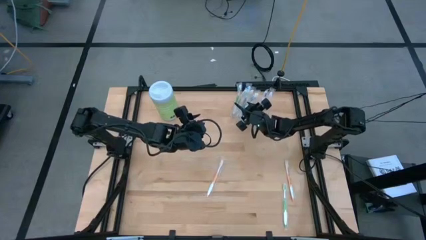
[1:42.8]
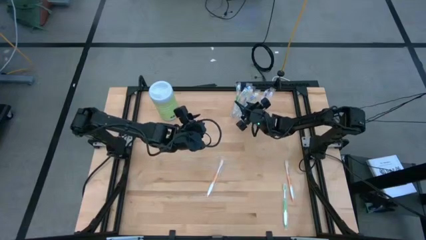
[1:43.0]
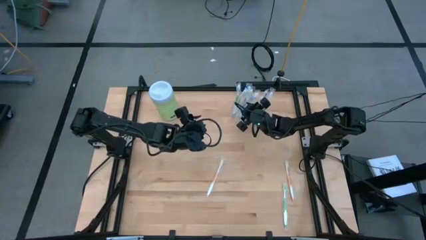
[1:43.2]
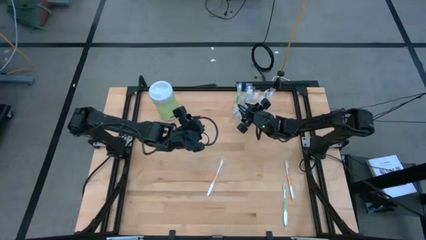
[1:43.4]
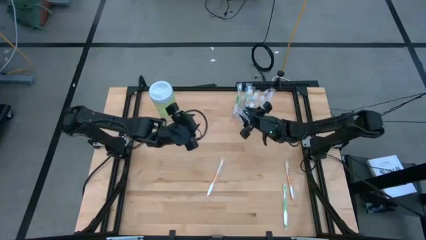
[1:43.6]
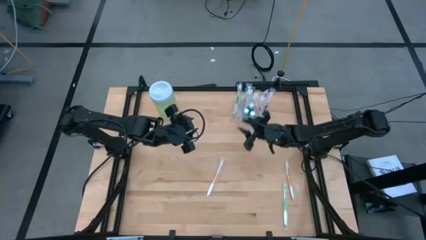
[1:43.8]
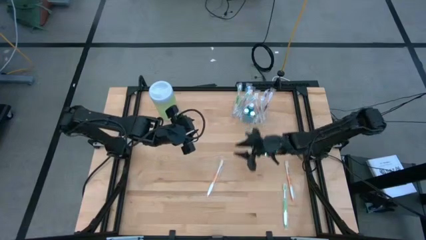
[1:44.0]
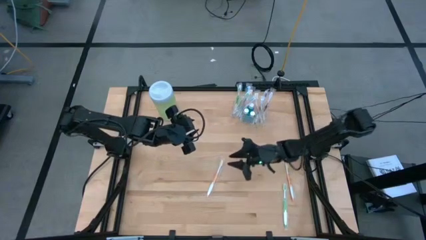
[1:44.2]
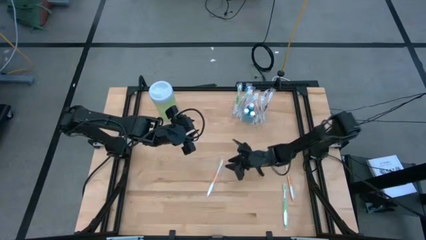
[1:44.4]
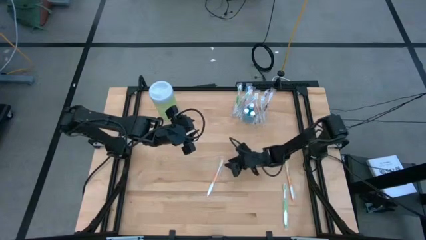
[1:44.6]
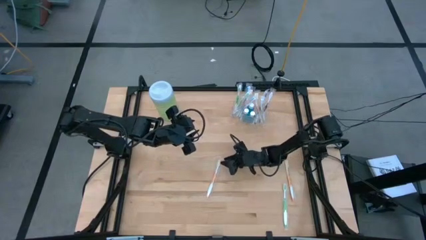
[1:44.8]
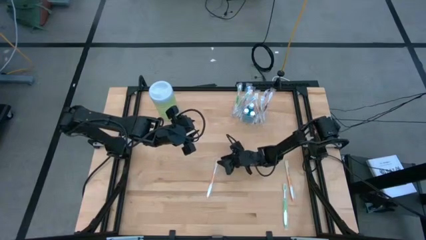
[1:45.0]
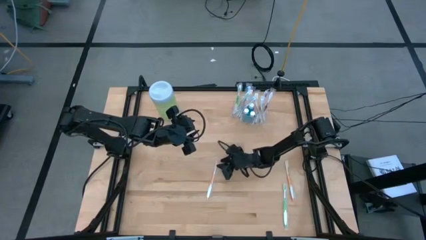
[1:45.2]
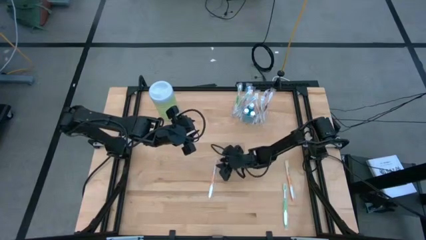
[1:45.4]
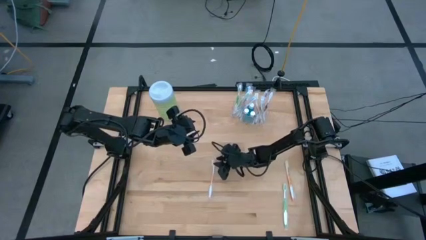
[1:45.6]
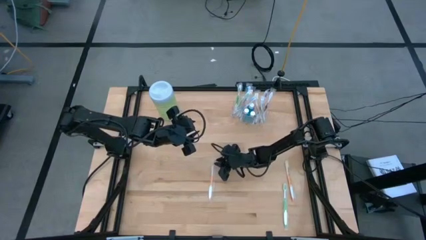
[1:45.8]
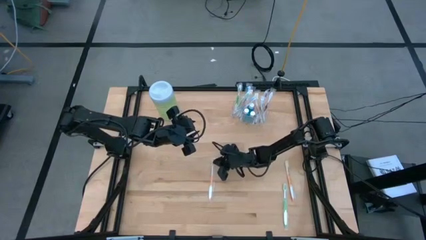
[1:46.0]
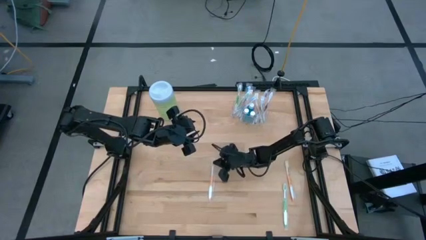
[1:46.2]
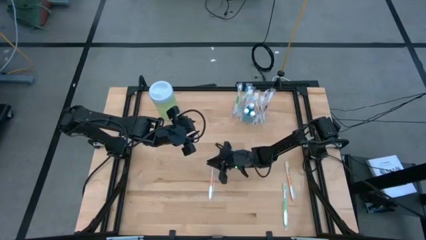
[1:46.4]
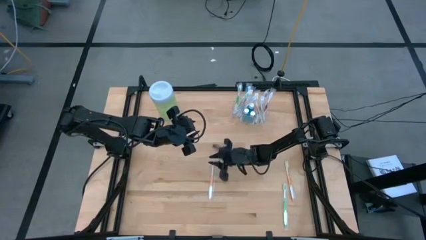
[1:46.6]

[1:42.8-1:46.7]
Task: Pick & Place toothbrushing station
Put the orange toothbrush into the transparent organizer

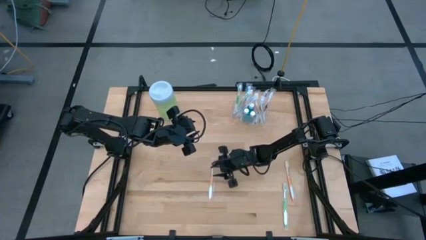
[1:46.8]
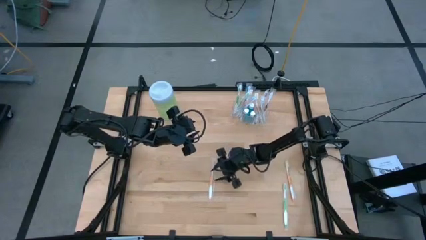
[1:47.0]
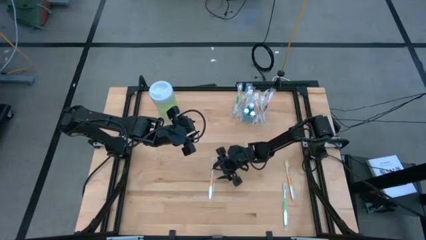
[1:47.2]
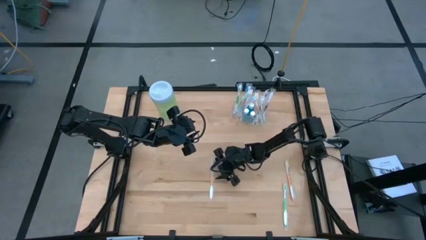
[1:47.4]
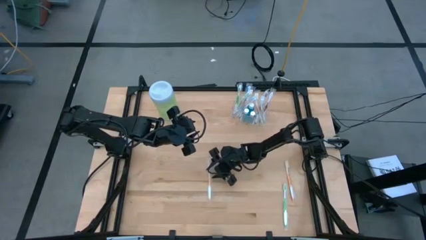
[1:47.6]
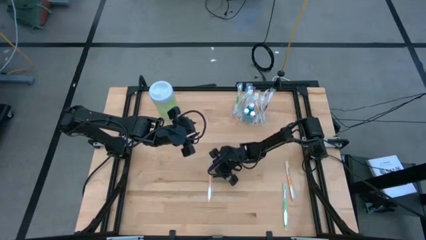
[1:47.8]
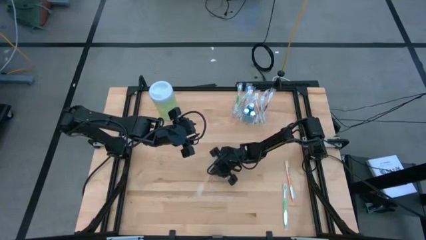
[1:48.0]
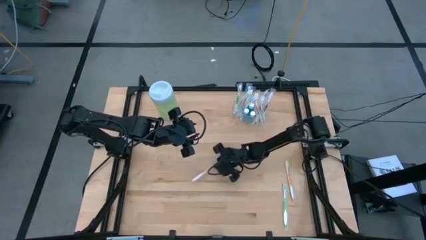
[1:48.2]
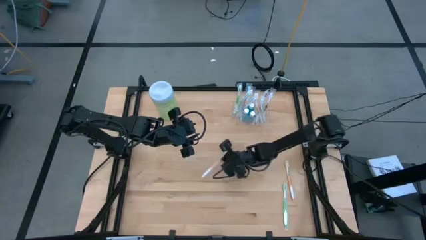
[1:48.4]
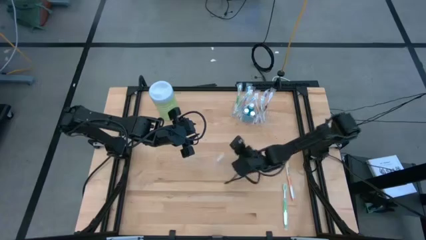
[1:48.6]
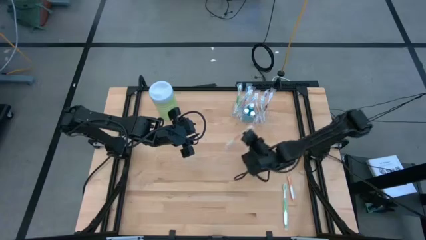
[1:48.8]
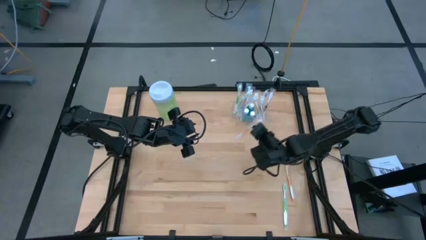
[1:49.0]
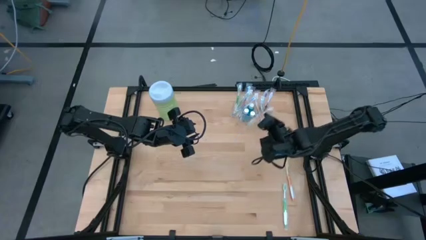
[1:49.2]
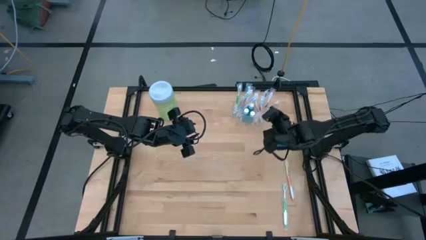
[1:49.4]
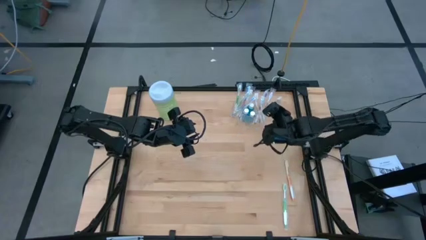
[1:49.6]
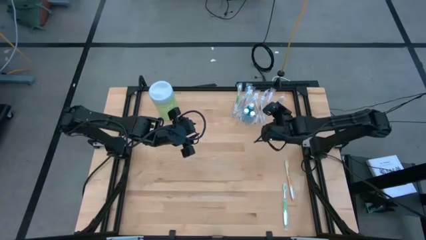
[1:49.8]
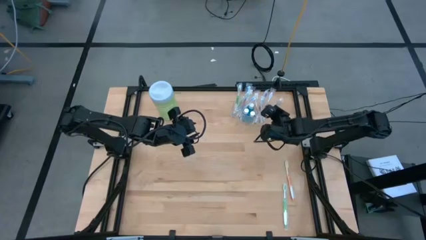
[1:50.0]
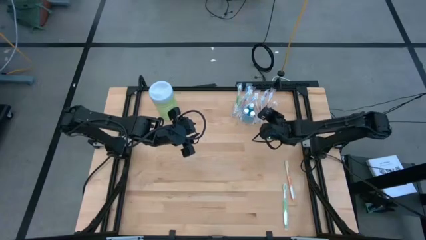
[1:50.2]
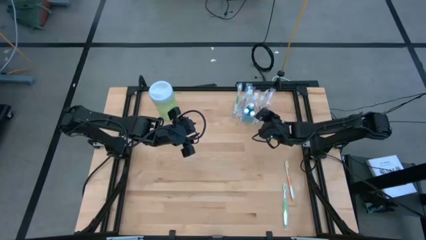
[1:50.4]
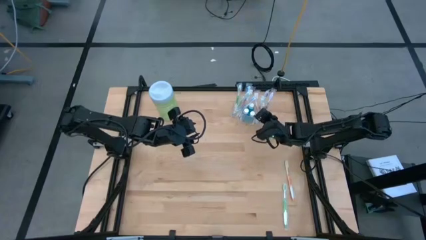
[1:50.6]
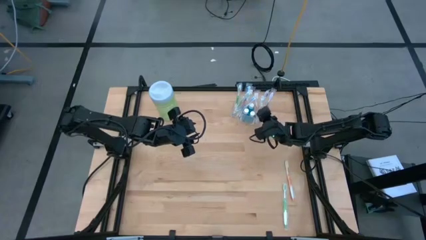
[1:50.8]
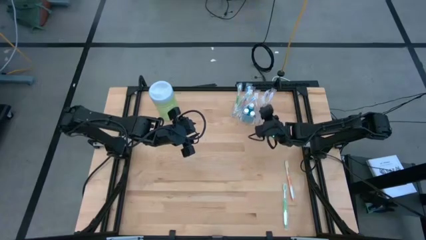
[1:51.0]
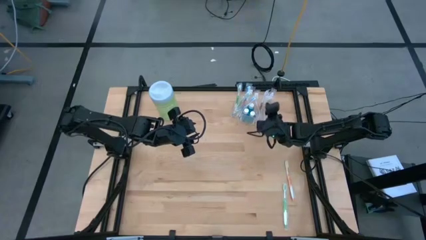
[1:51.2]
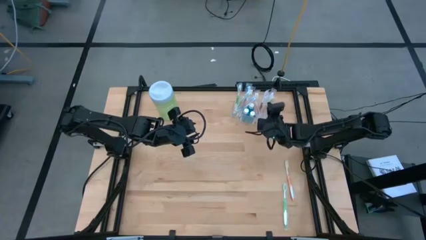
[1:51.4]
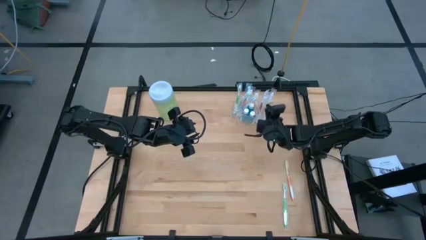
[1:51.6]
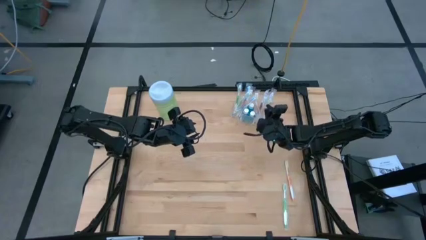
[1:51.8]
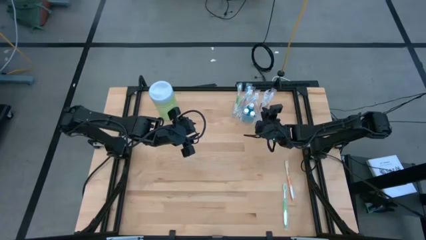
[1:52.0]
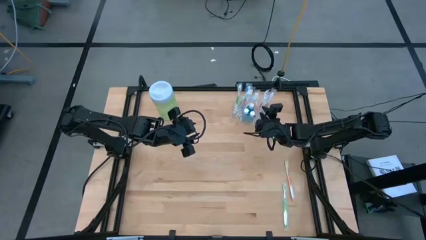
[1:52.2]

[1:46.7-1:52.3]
Put the orange toothbrush into the transparent organizer

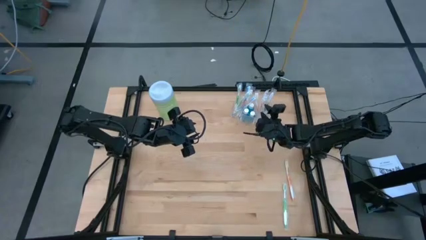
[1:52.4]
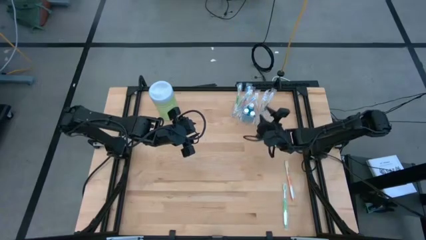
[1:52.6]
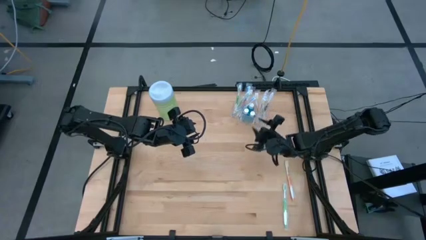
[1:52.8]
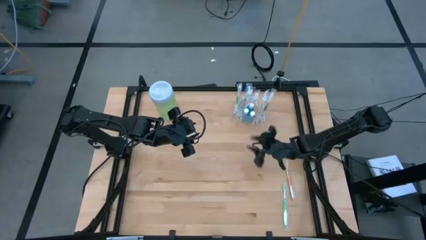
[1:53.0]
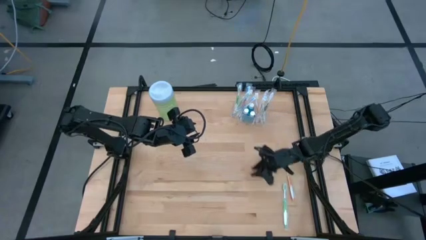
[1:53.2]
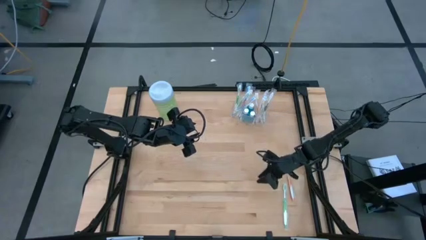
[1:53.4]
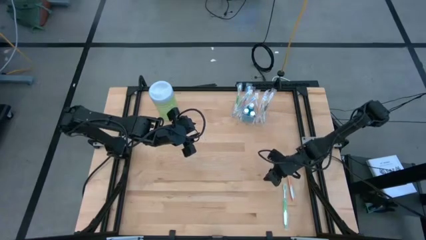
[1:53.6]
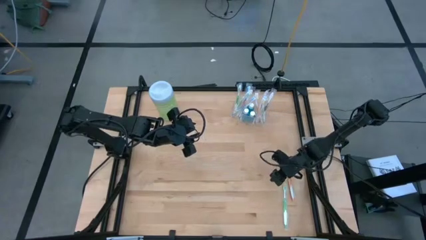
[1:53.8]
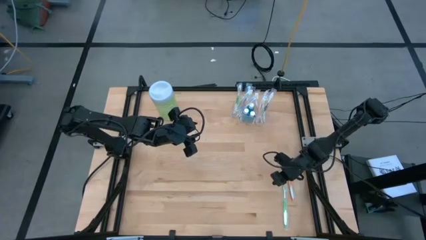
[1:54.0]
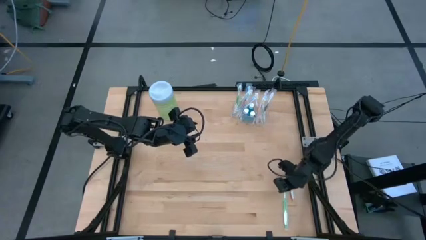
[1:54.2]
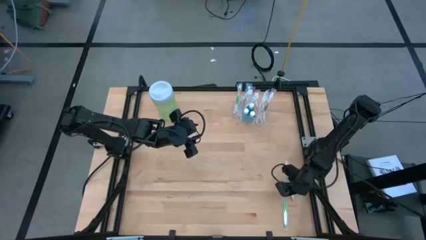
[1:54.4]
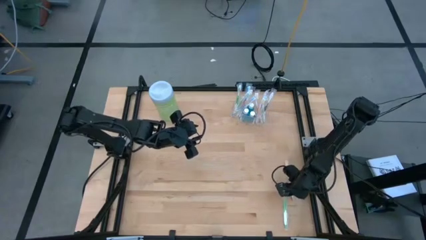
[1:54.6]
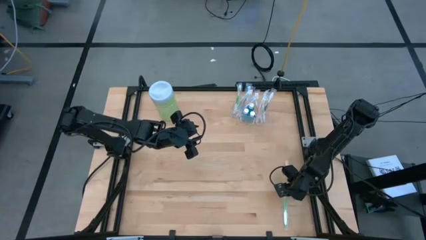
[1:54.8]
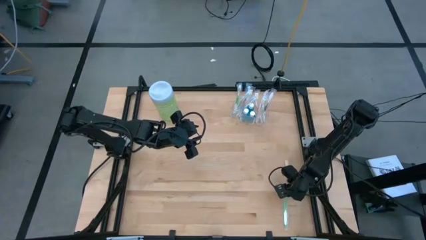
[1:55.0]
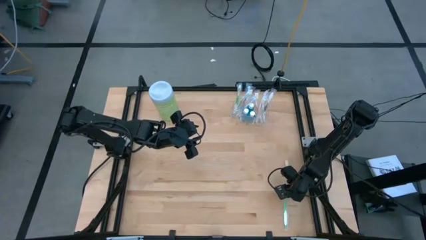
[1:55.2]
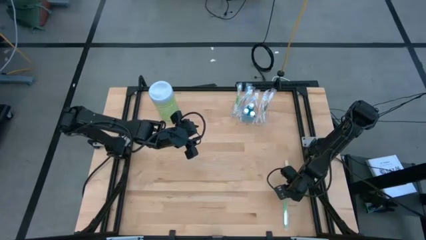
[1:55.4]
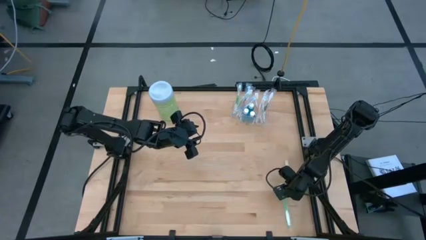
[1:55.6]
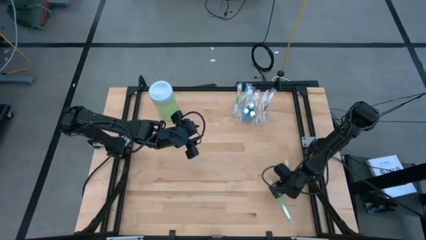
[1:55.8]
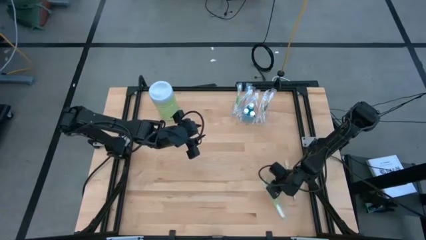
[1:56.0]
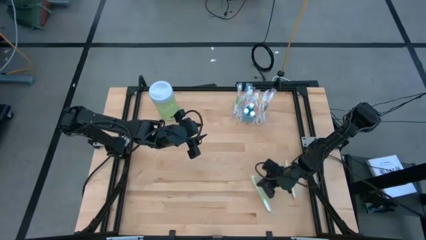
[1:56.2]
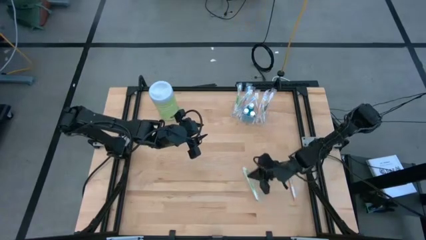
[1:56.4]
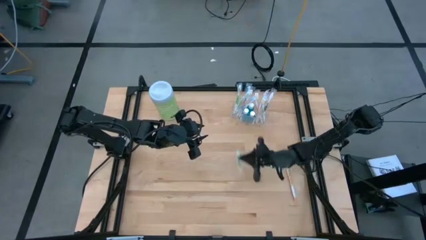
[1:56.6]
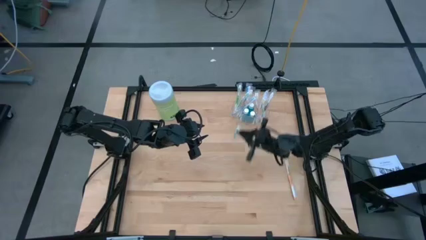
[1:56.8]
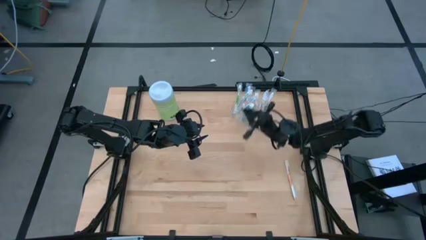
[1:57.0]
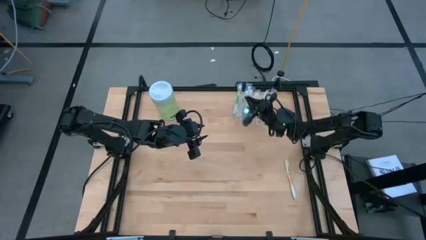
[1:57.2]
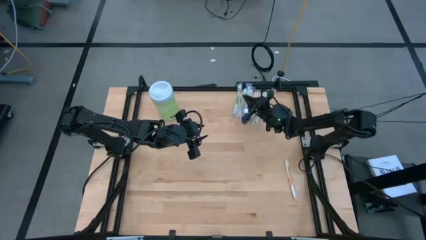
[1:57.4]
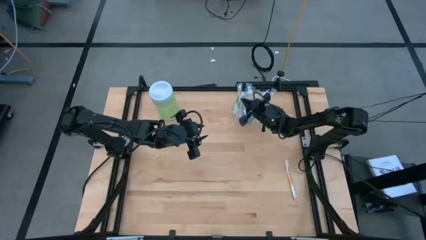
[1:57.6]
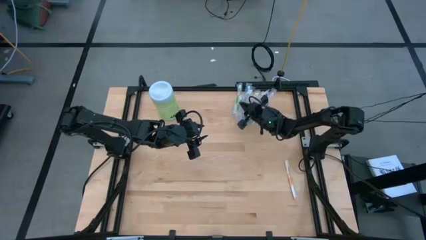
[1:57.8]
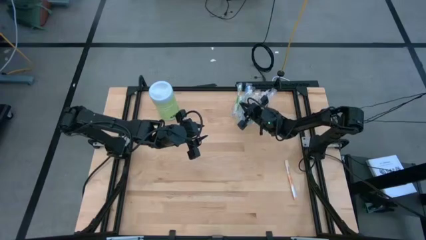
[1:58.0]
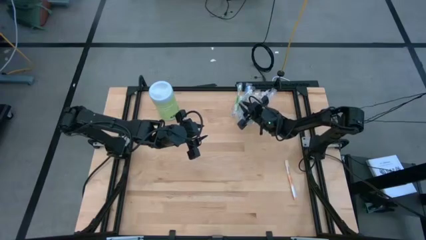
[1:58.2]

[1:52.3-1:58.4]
Put the green toothbrush into the transparent organizer

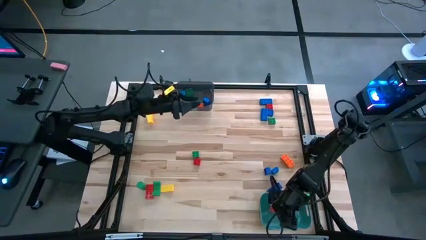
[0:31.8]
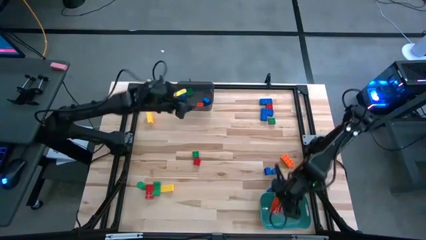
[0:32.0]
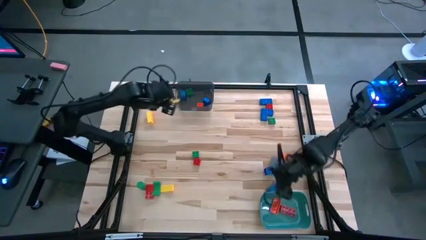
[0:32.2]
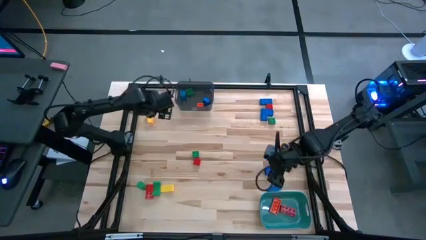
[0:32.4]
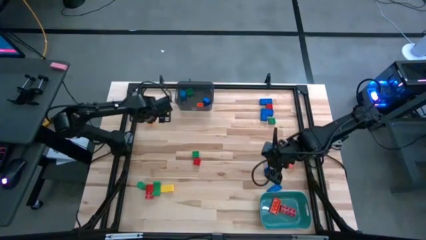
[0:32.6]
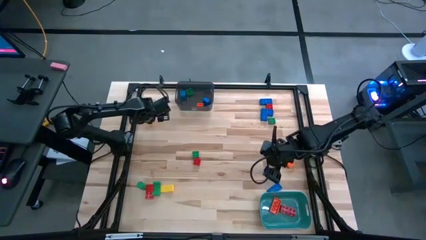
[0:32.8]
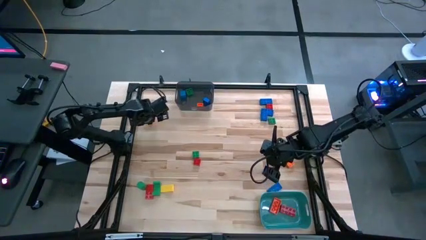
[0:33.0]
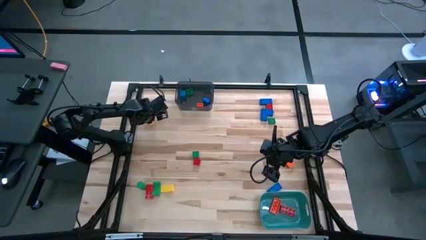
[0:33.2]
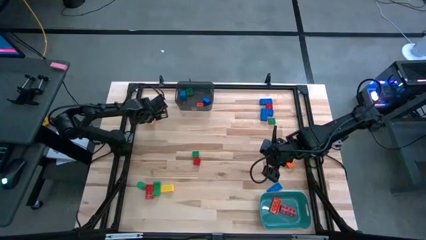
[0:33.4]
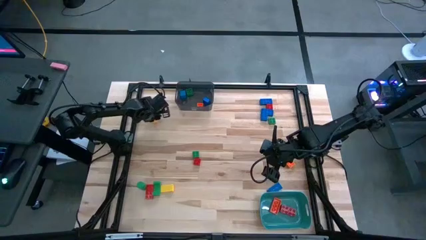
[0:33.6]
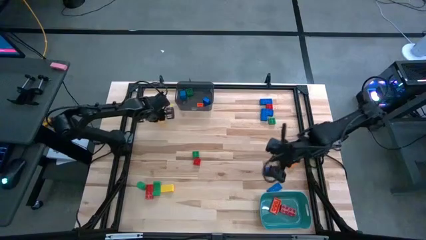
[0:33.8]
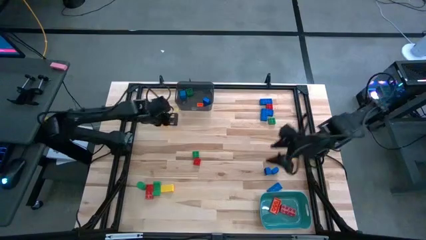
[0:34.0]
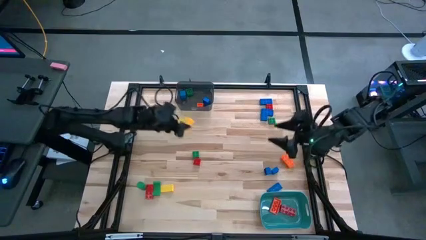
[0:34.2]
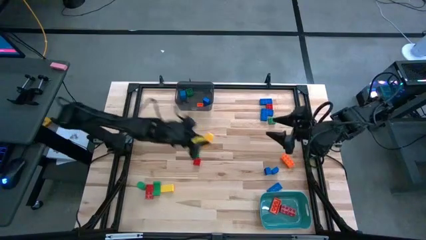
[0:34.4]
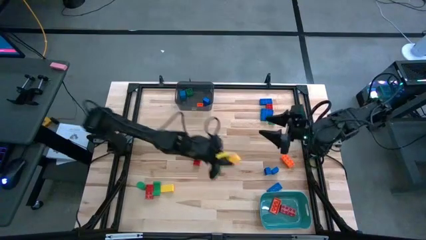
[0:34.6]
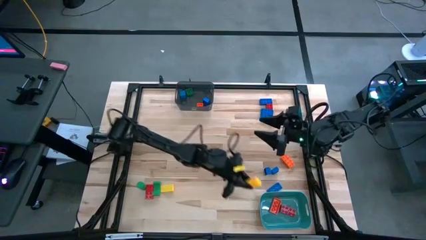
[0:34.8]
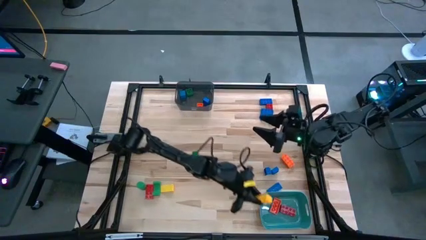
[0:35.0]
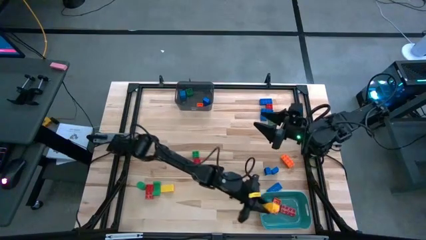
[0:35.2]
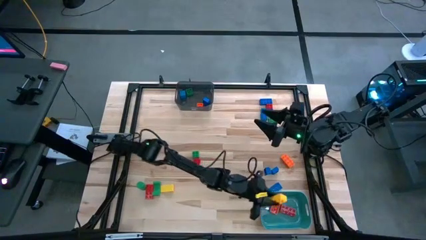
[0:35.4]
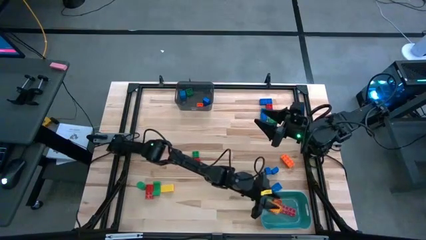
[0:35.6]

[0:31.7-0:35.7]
Task: Sort blocks by size
Put the yellow game piece into the green bin
